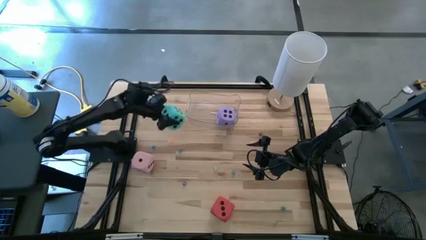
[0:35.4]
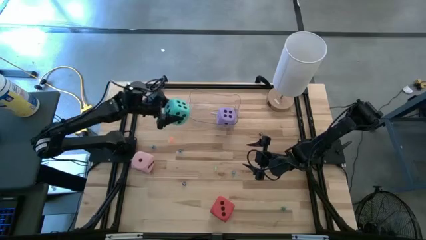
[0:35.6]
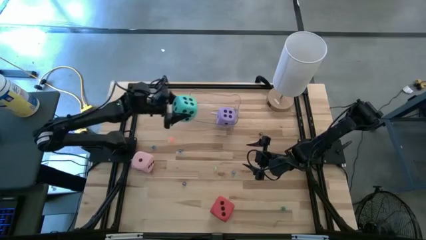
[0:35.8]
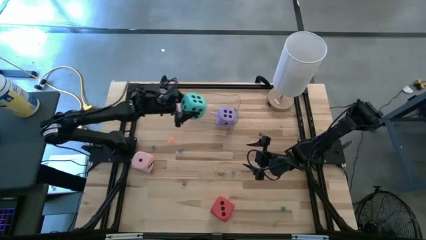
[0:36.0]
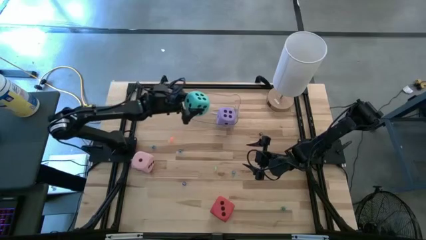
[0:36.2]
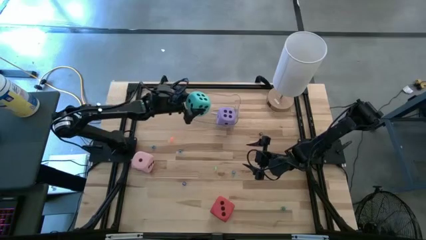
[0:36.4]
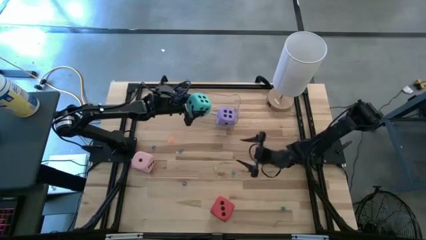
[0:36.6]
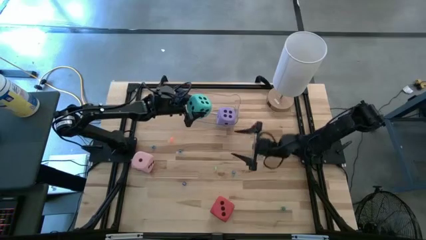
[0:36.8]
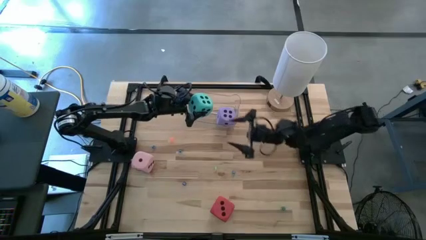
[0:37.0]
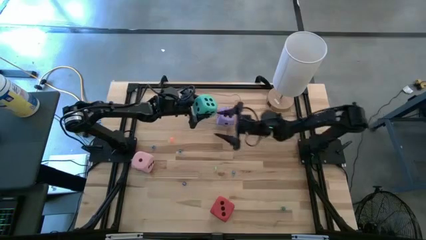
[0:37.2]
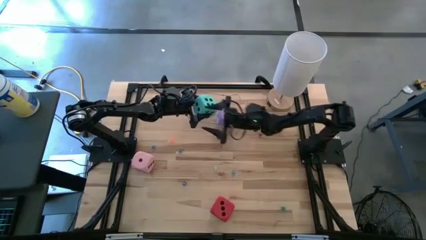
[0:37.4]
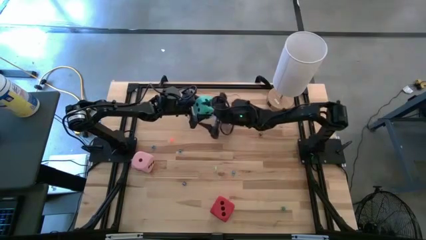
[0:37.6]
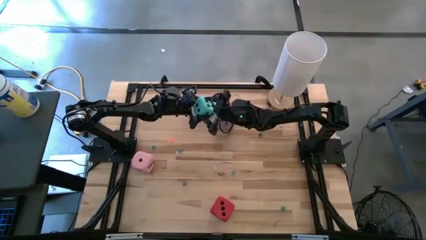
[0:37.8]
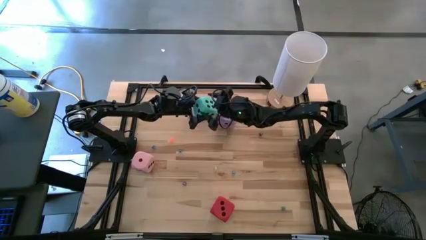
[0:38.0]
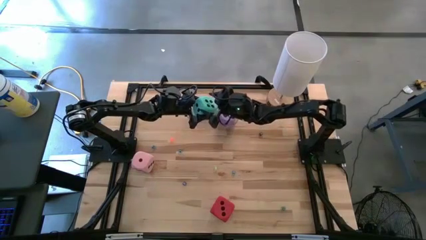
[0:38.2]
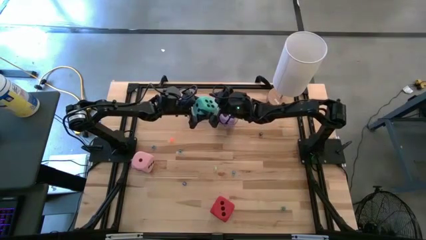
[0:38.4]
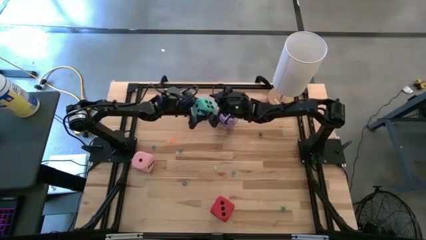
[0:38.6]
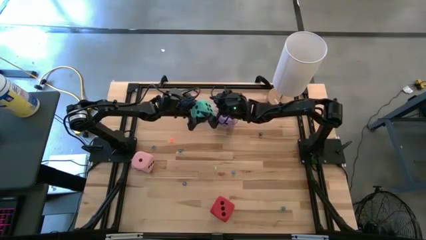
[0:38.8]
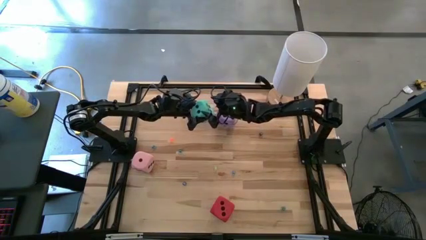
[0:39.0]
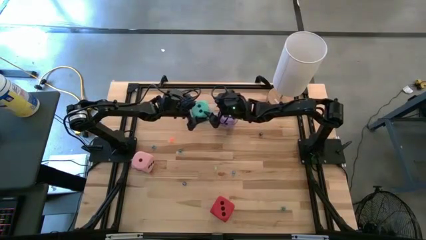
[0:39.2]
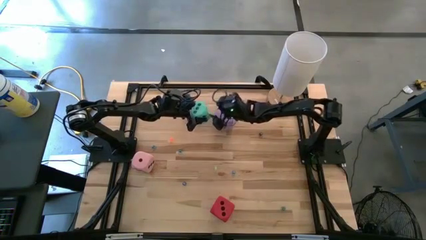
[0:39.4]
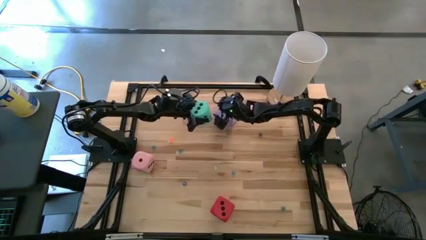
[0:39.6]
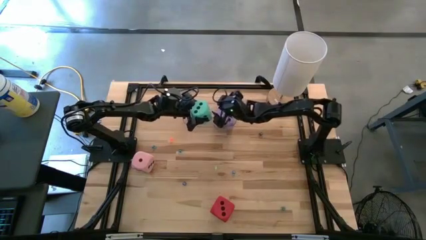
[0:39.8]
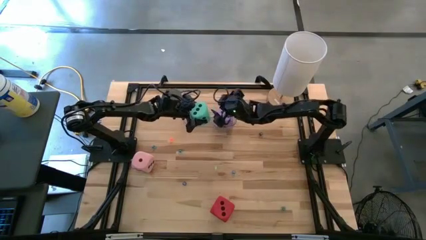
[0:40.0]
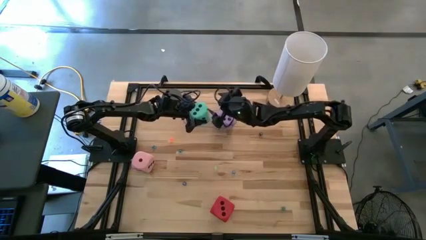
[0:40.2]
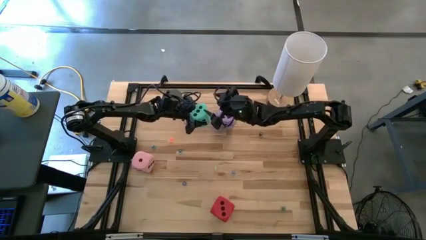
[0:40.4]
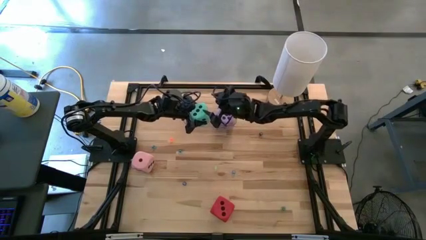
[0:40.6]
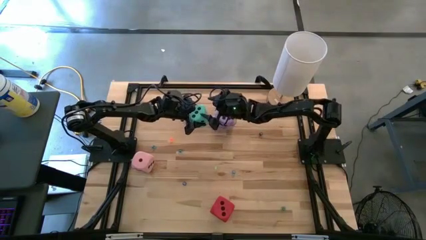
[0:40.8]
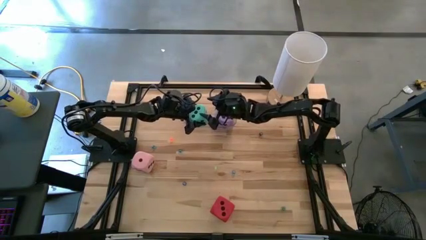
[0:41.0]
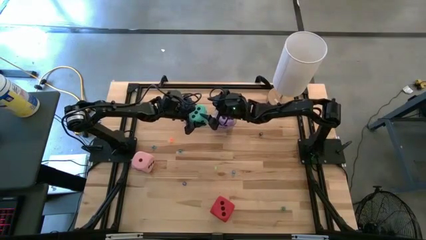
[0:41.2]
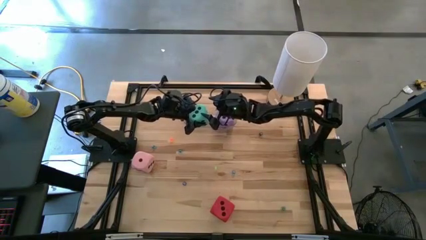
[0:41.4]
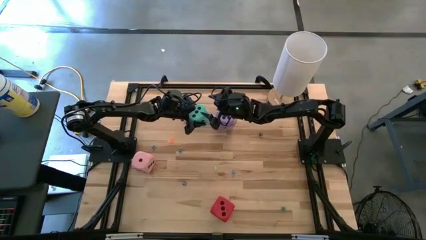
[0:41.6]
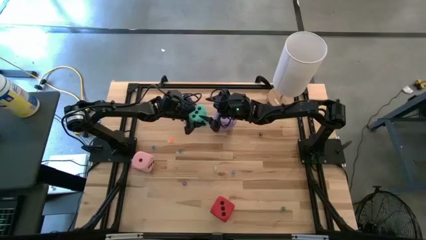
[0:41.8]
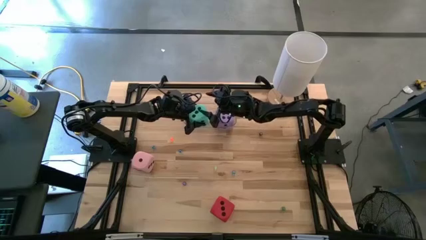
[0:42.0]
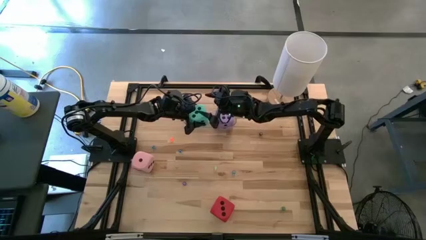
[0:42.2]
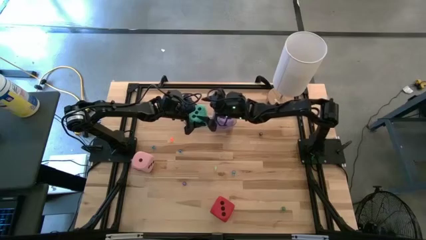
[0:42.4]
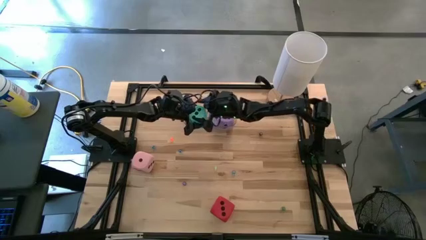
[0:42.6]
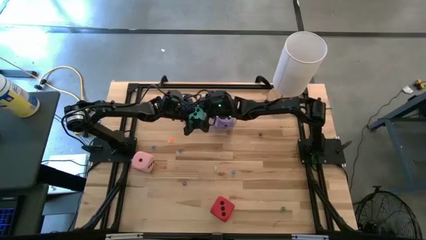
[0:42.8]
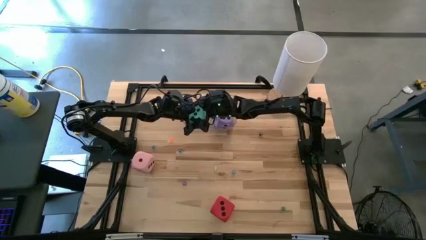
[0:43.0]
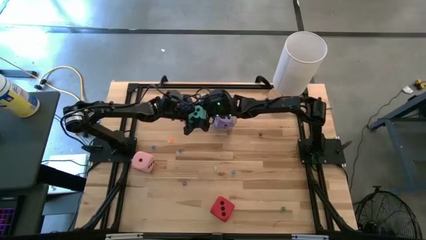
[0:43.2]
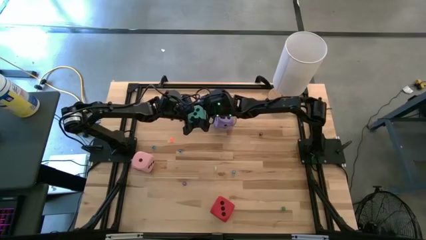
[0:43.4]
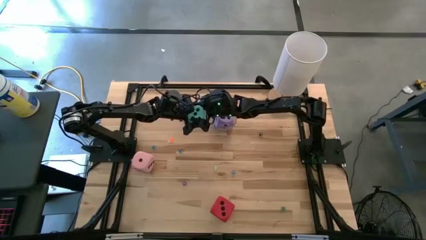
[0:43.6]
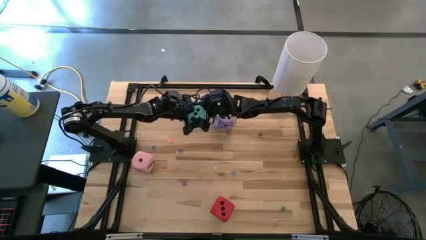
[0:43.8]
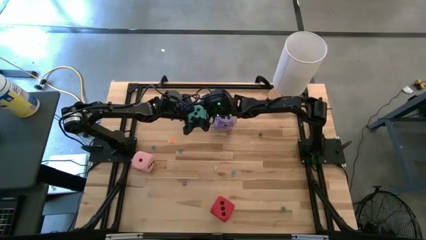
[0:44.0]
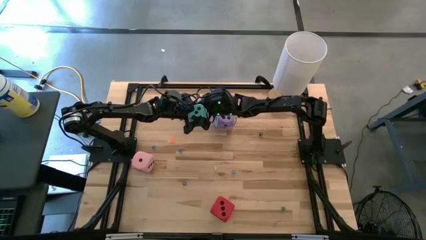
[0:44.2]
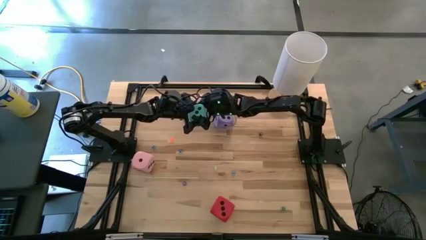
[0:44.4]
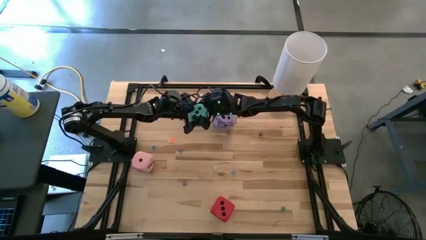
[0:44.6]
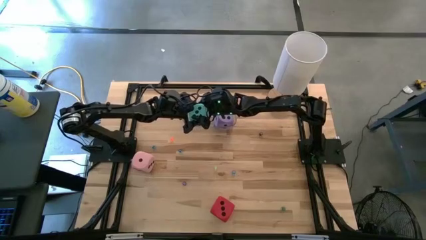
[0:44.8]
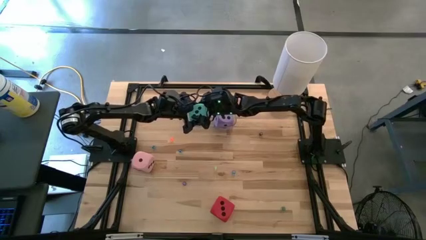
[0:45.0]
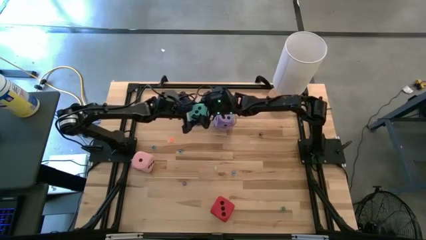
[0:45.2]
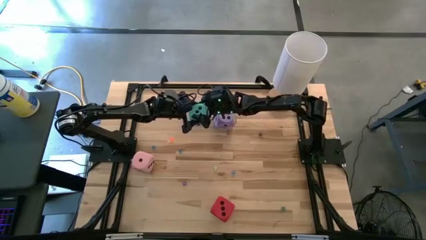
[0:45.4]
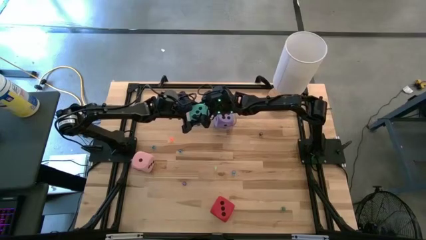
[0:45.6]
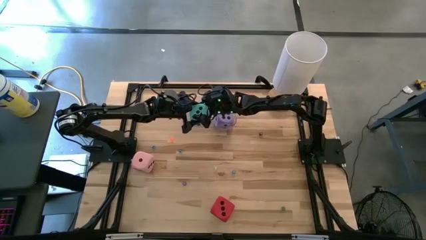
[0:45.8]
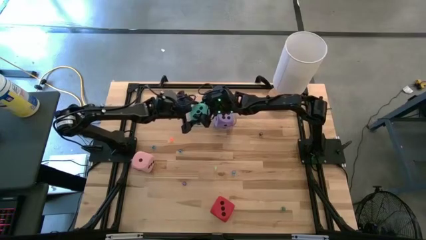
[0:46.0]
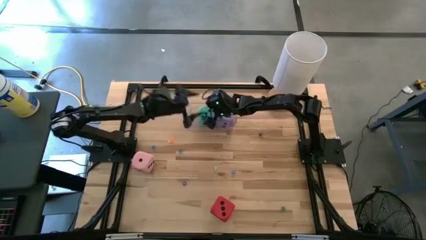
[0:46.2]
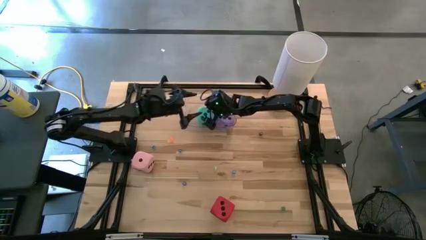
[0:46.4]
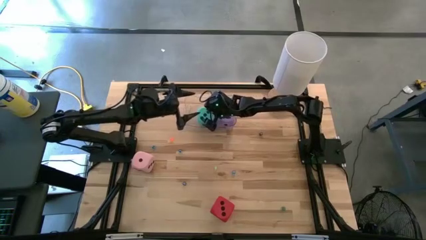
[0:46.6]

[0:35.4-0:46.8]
Task: Pick & Place Dice
Put the large blue dice into the transparent bin

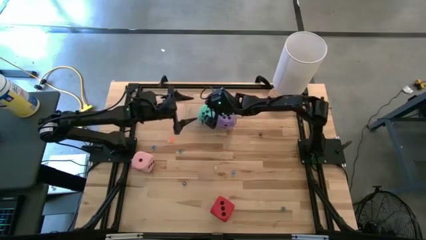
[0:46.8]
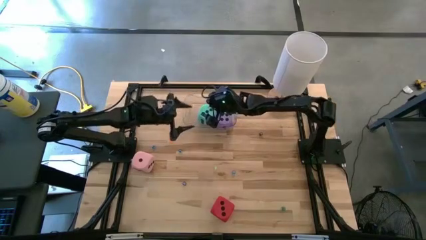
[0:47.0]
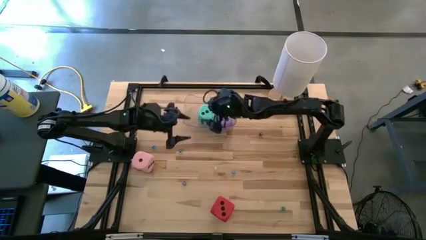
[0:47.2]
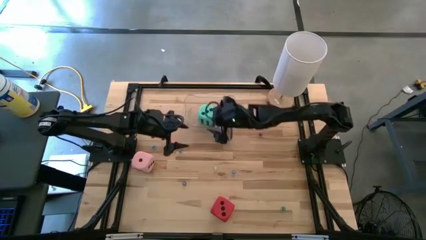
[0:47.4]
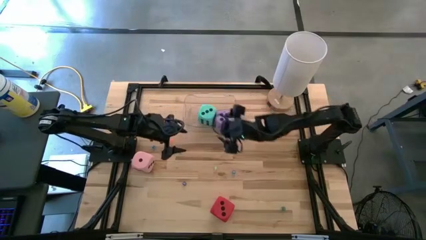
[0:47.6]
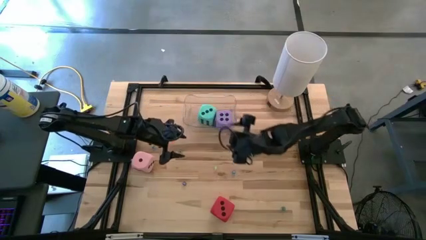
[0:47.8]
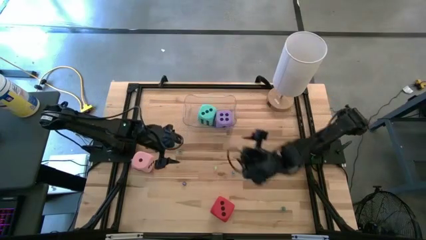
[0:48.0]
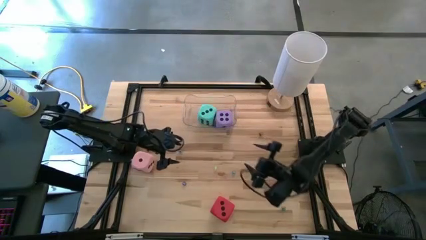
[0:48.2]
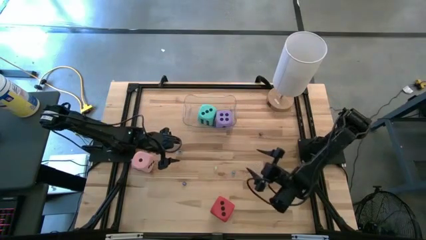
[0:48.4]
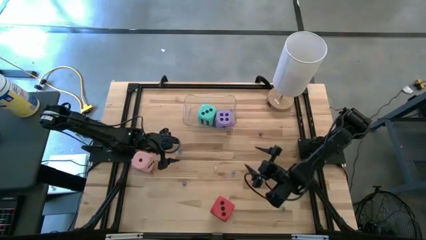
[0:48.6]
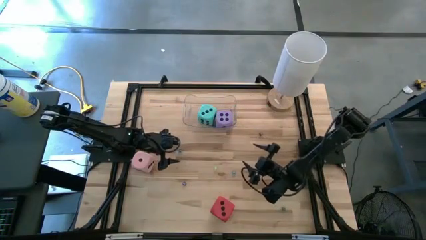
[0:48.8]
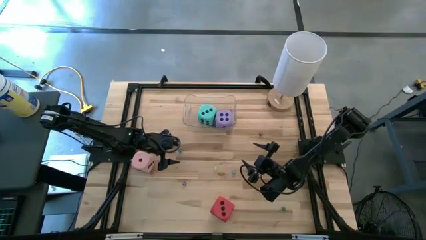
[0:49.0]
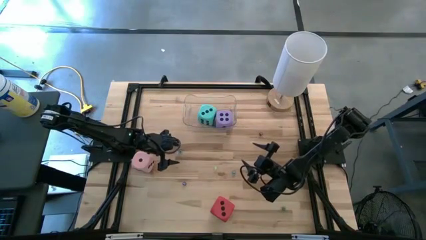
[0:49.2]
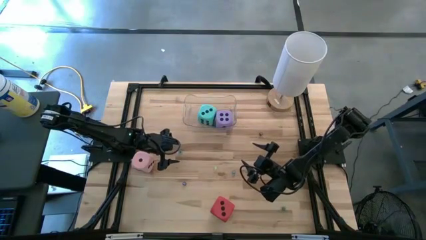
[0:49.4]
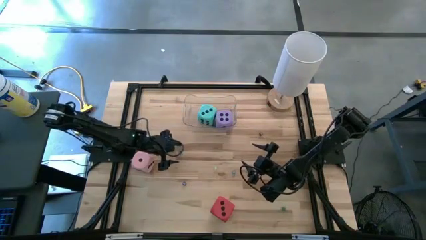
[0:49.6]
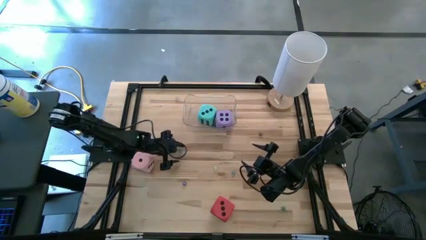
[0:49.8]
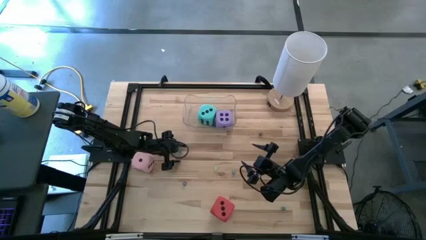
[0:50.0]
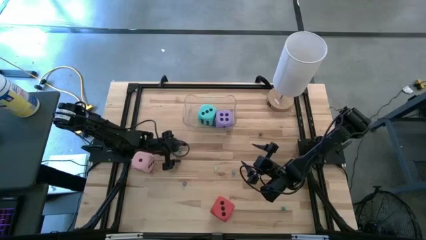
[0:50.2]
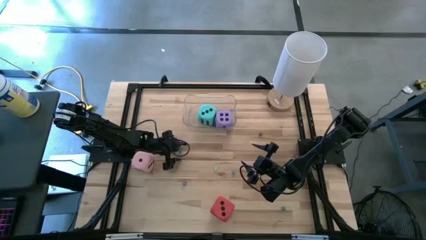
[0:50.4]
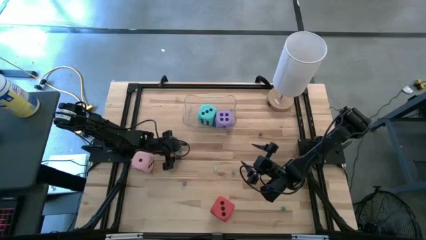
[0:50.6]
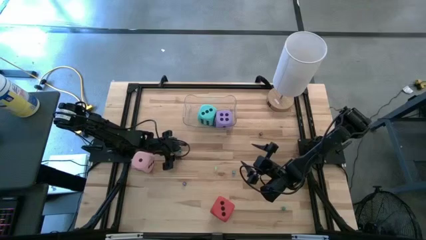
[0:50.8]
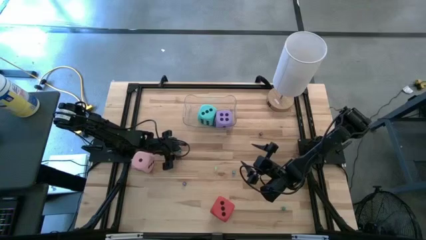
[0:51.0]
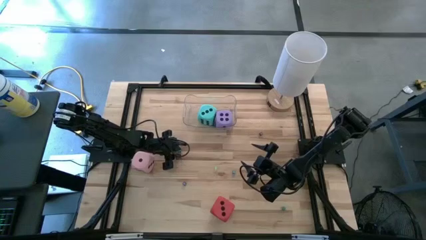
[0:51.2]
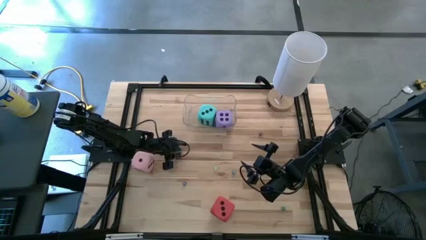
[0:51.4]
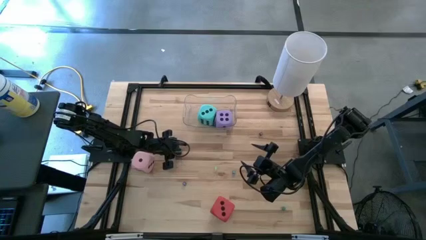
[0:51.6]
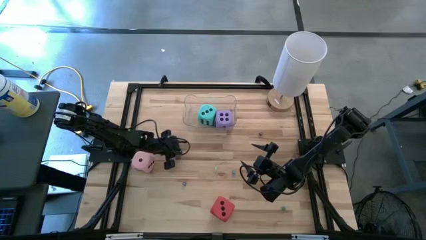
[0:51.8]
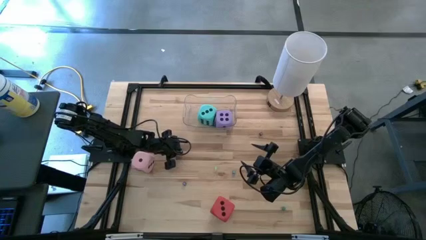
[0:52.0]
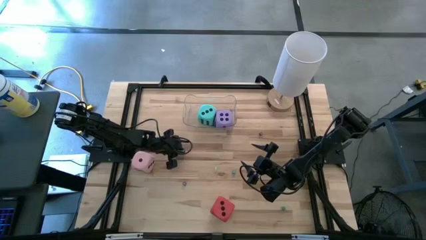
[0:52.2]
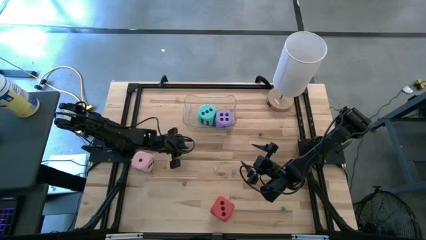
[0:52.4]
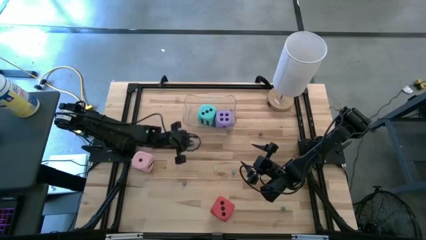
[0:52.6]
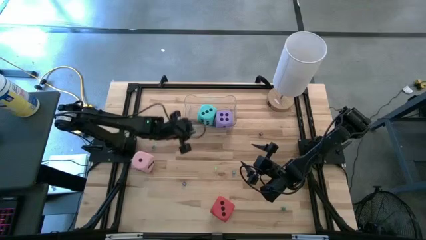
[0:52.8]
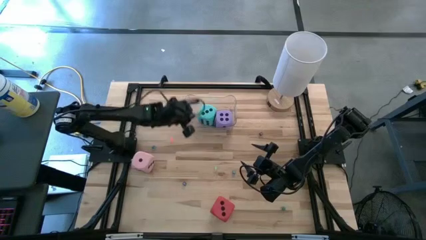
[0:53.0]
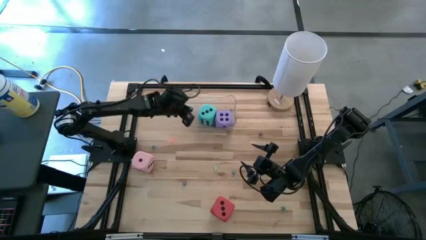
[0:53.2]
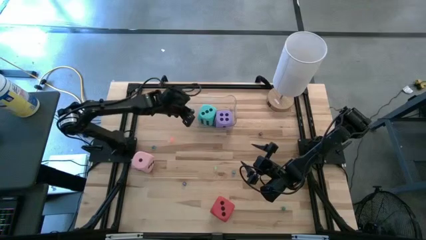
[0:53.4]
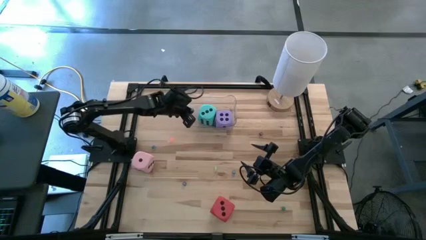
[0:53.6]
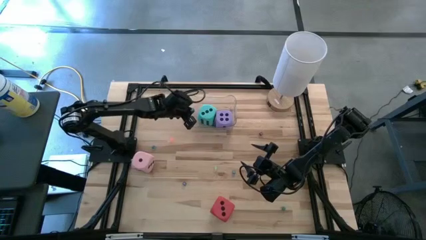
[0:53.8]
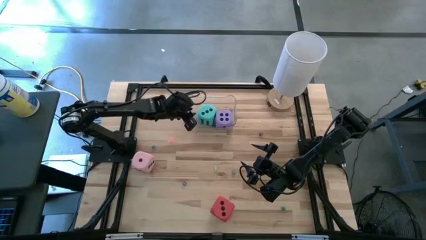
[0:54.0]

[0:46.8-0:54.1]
Put the blue dice into the transparent bin
